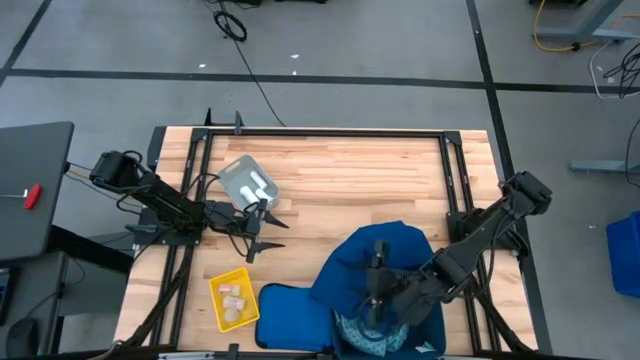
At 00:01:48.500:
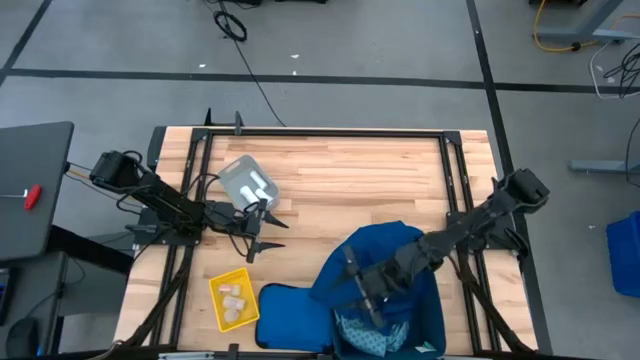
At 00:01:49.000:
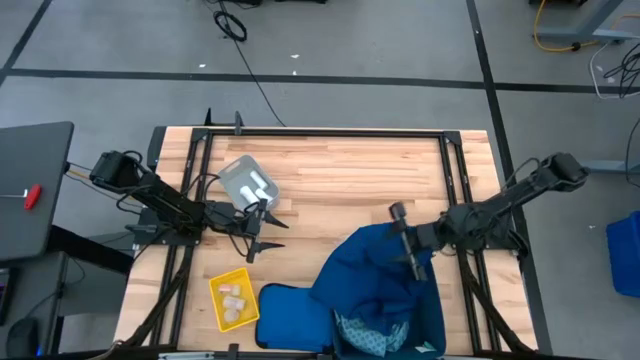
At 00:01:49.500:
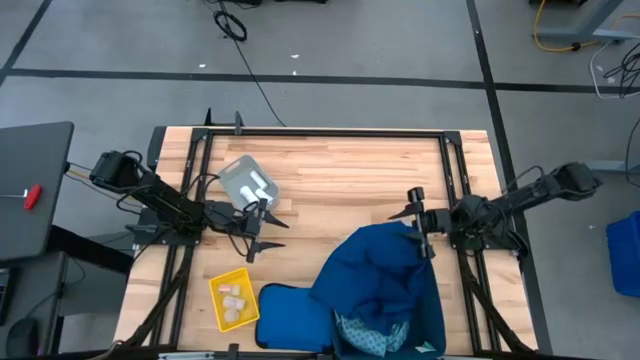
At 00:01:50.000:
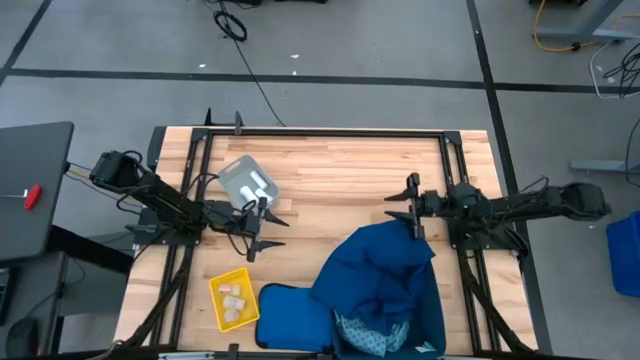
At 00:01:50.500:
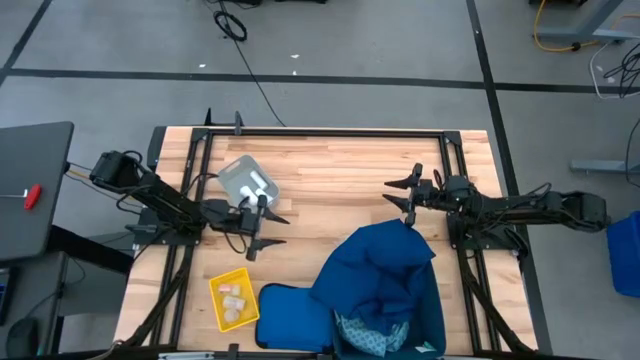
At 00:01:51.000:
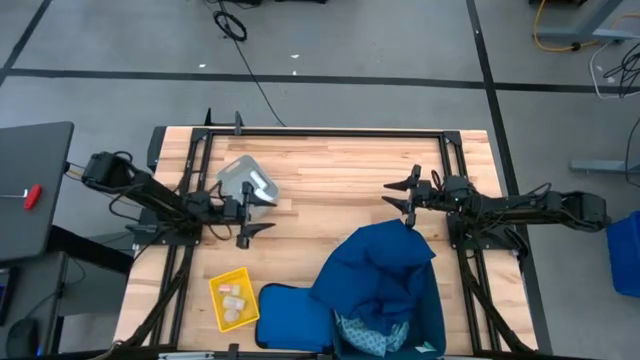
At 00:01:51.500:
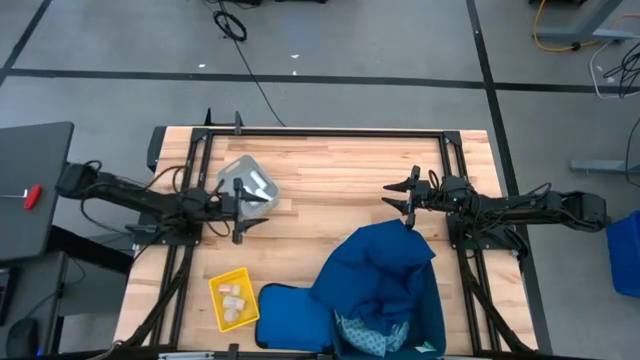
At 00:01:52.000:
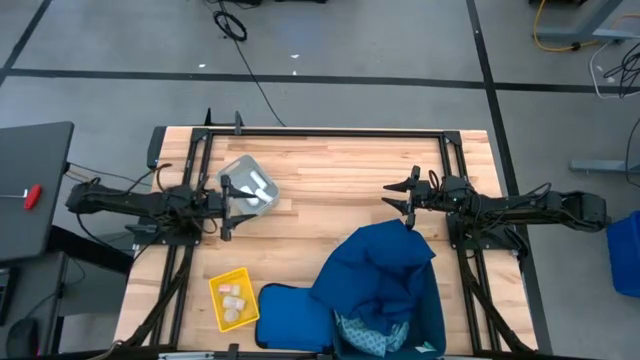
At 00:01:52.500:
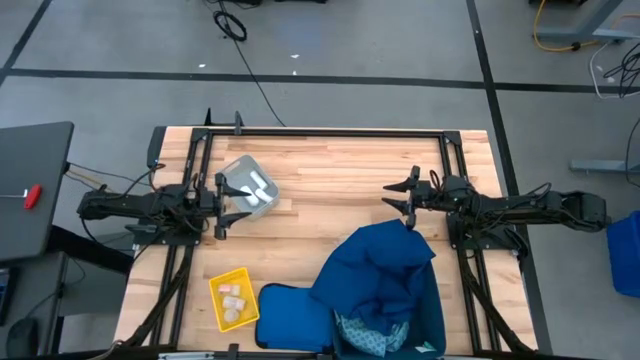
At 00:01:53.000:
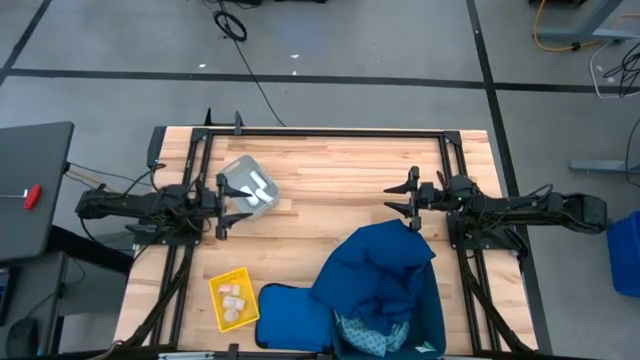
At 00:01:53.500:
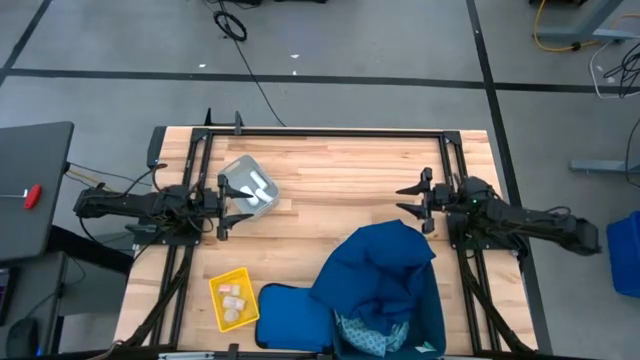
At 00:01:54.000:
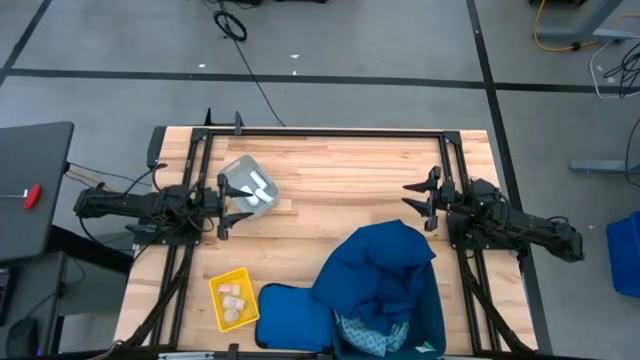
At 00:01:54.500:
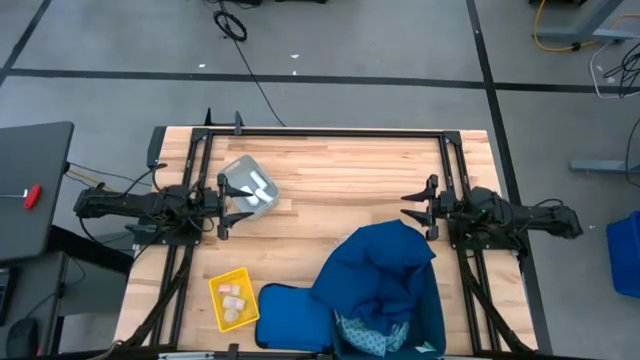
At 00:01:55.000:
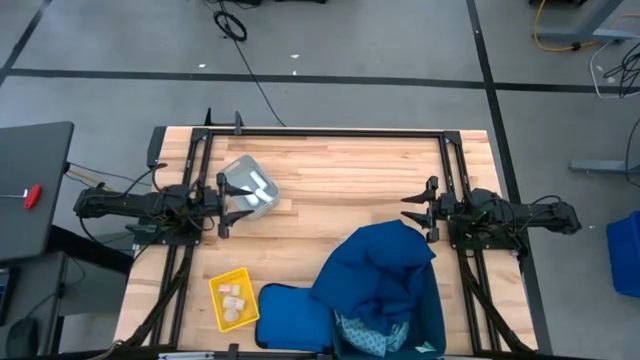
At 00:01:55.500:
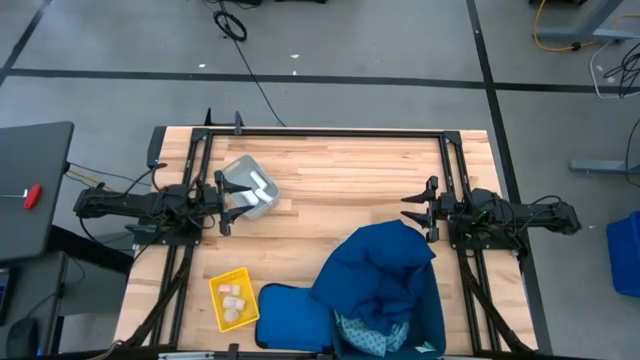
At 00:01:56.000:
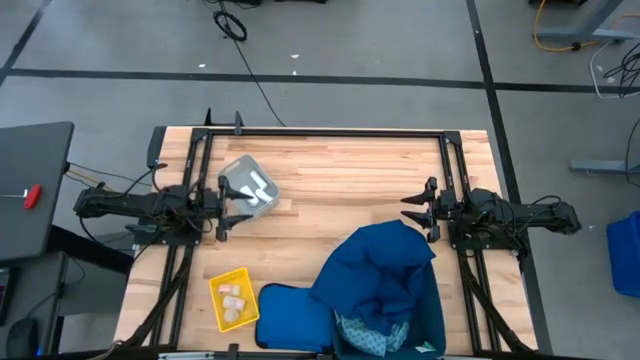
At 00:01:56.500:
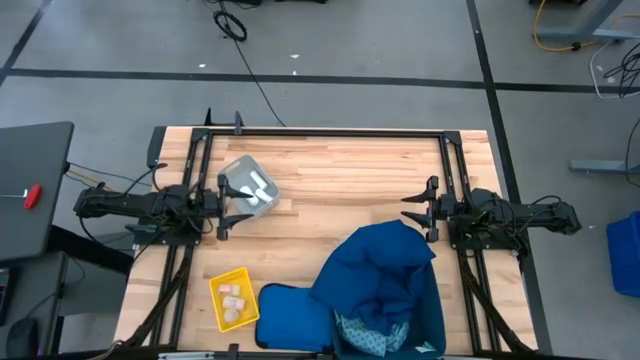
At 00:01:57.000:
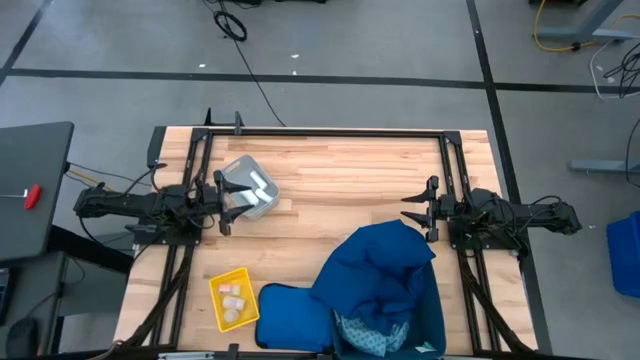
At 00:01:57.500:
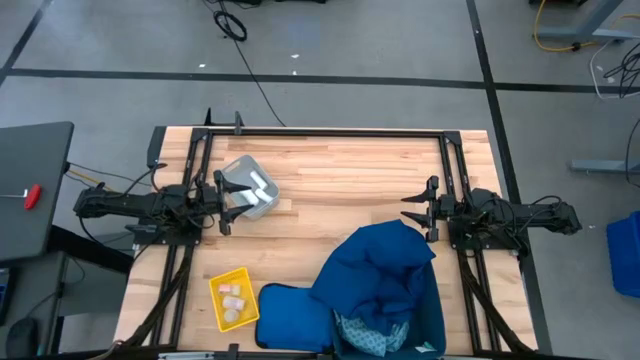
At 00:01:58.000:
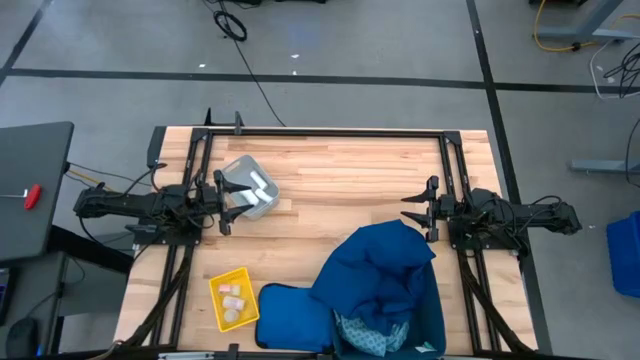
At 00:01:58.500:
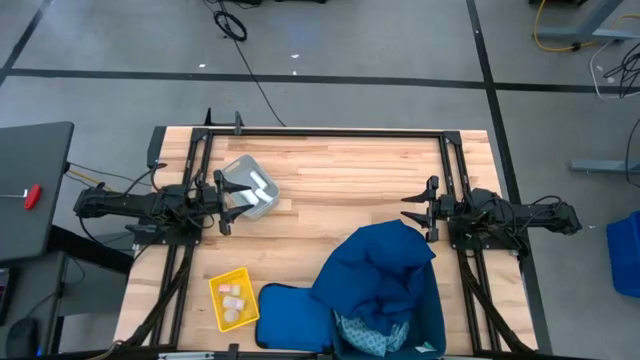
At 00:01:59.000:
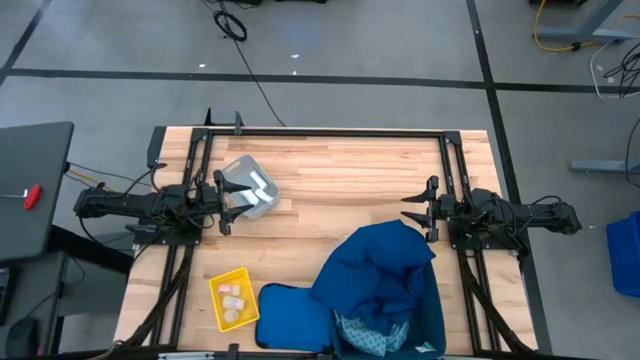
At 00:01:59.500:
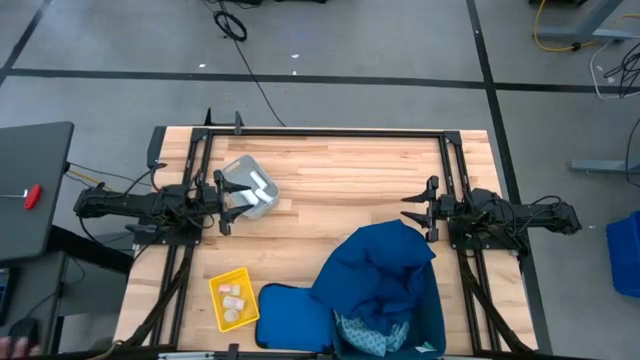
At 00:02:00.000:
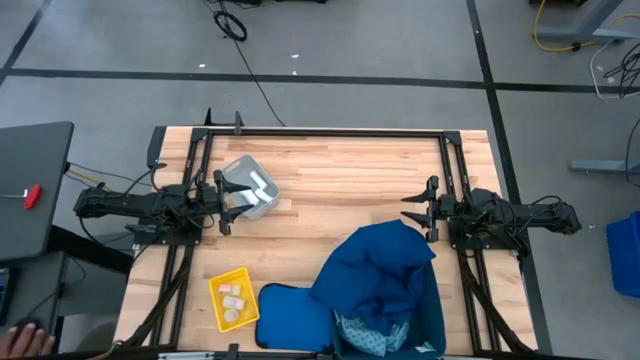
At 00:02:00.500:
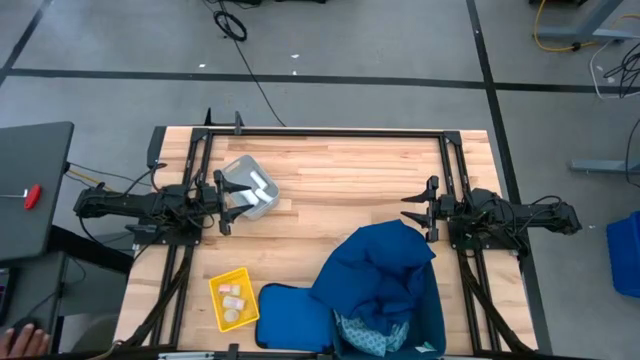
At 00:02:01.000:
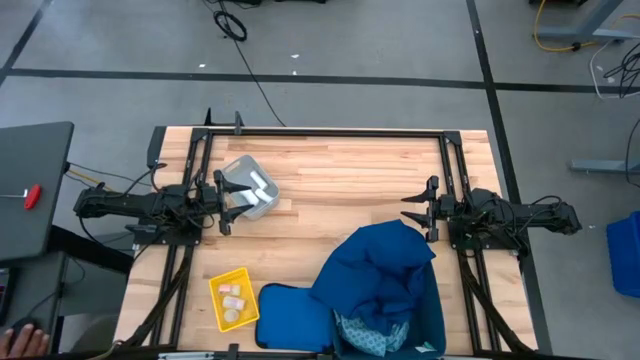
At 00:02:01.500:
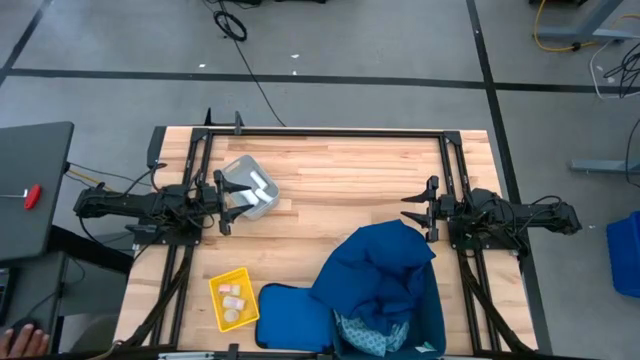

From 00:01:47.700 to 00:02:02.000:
Task: Pick & place medical supplies in basket/bin
Return to Home Position
